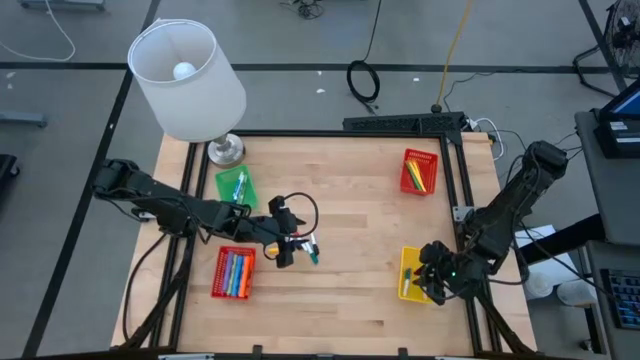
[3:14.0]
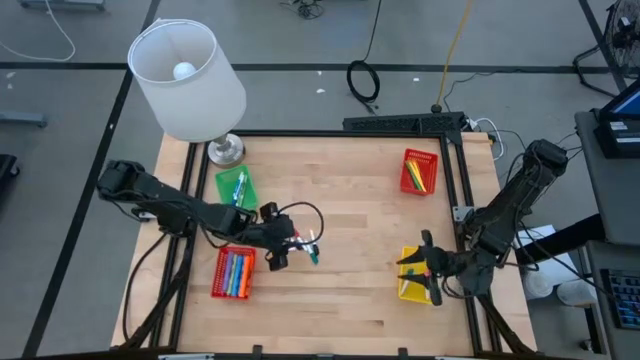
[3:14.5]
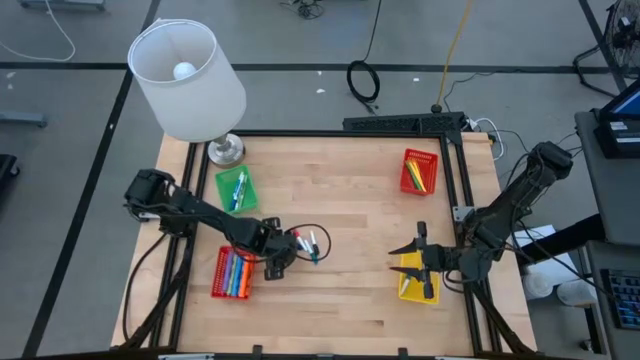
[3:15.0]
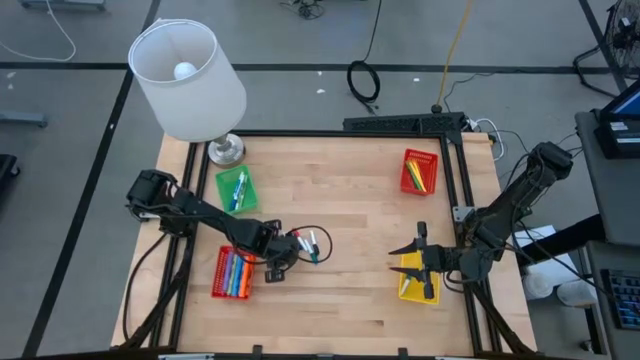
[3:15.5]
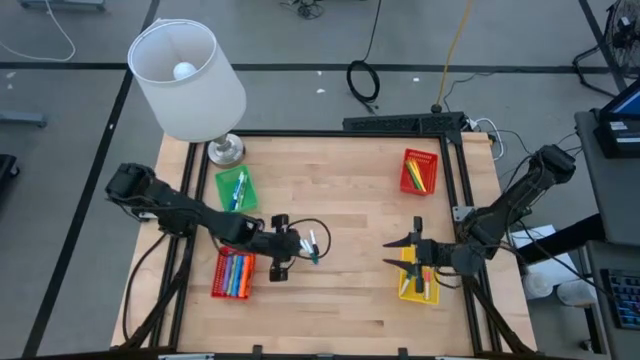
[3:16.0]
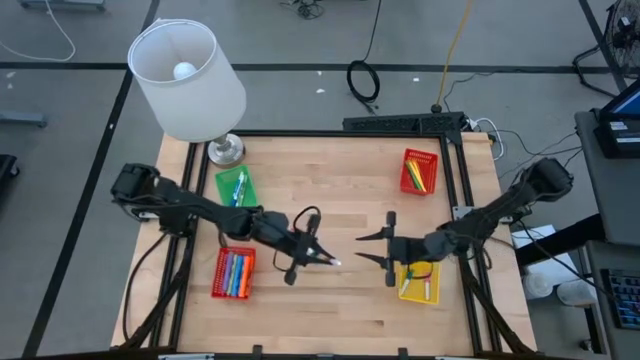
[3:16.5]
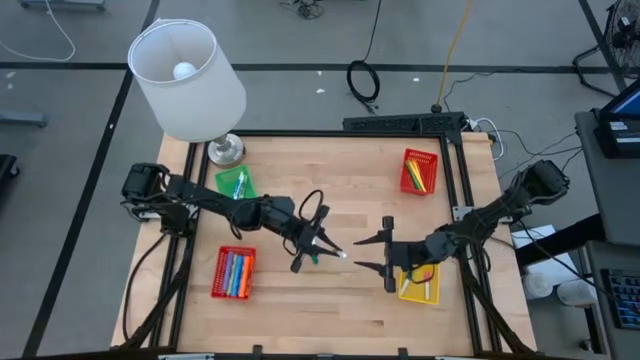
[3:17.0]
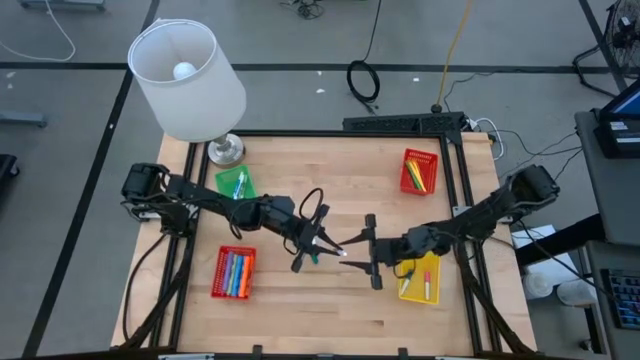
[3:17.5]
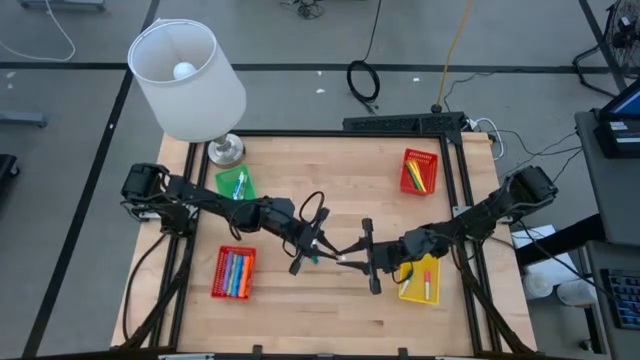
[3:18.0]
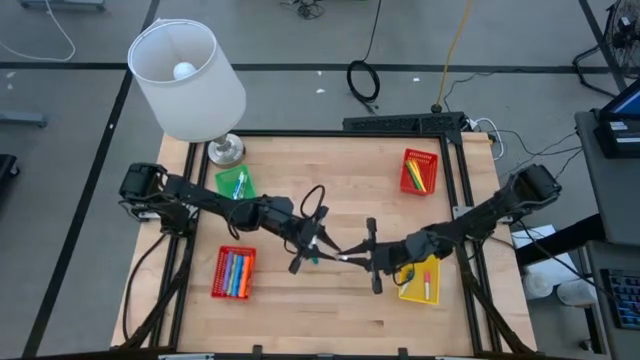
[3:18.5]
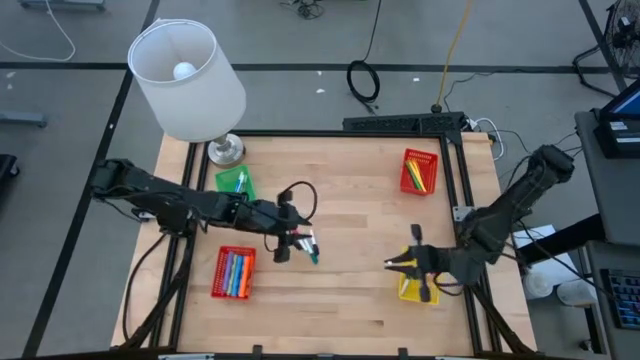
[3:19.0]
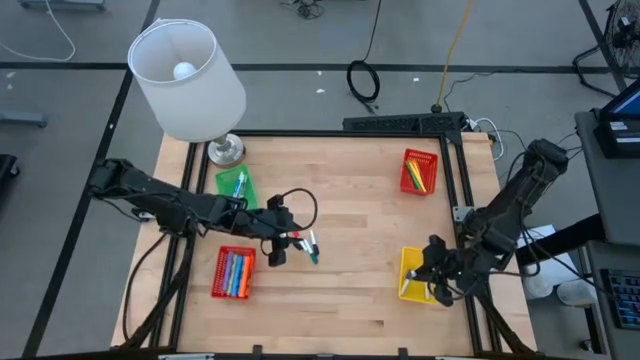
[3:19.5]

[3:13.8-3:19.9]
Task: Pick & Place Markers
Put the yellow highlighter pen into the yellow basket

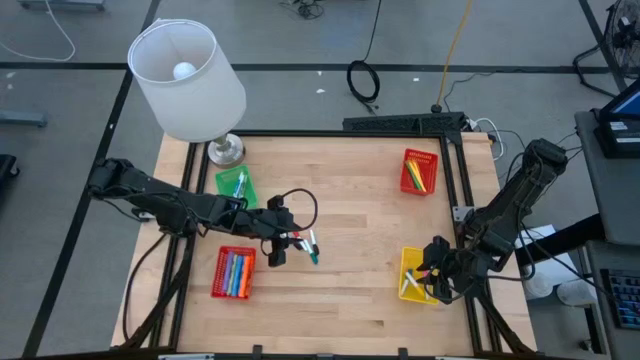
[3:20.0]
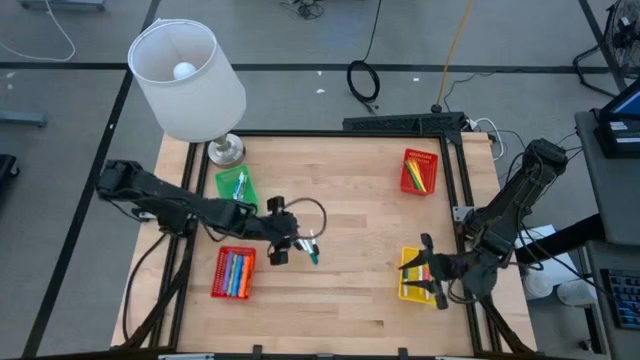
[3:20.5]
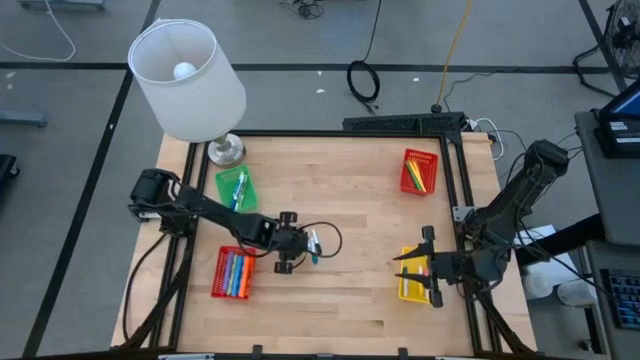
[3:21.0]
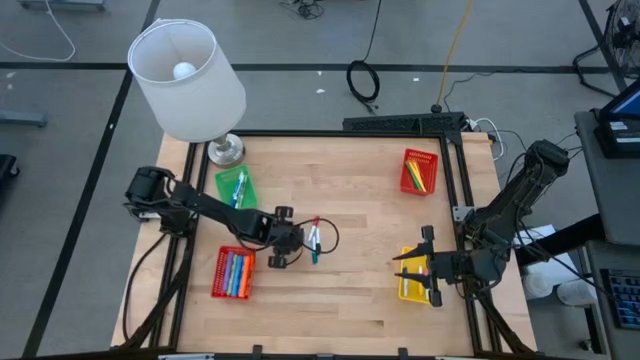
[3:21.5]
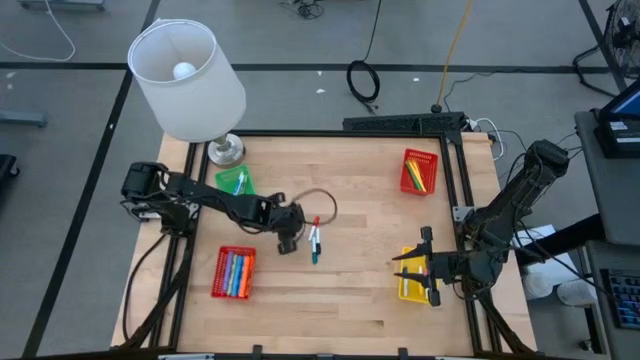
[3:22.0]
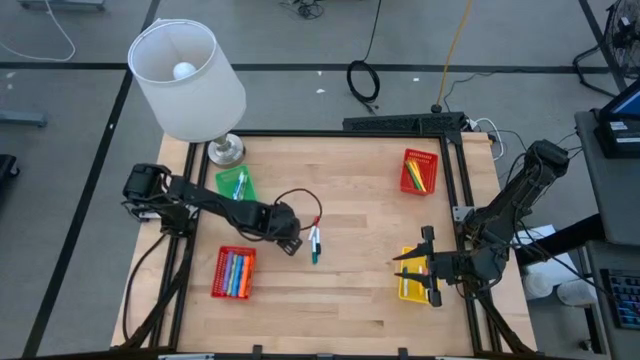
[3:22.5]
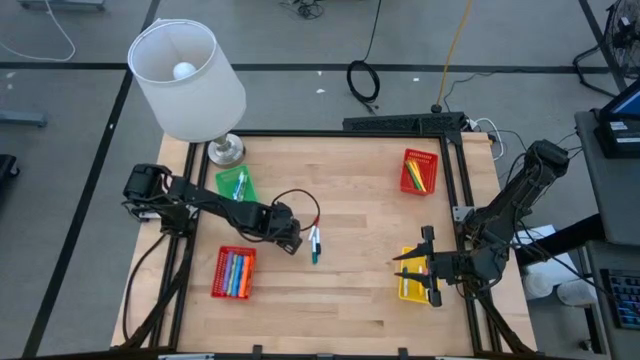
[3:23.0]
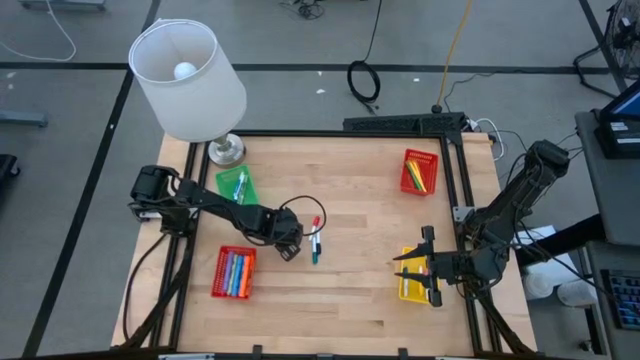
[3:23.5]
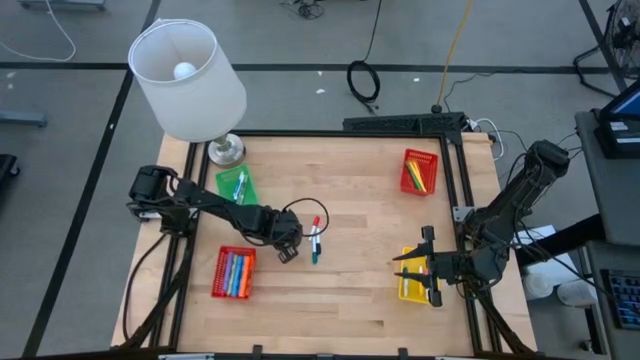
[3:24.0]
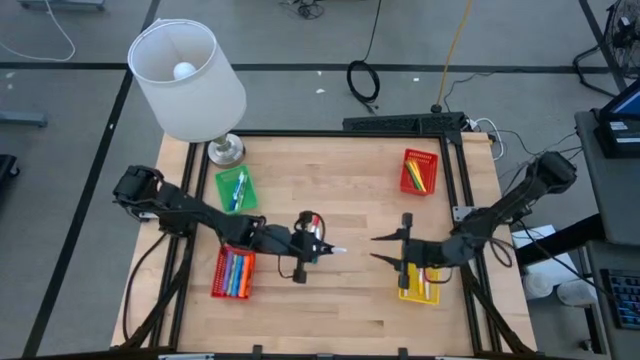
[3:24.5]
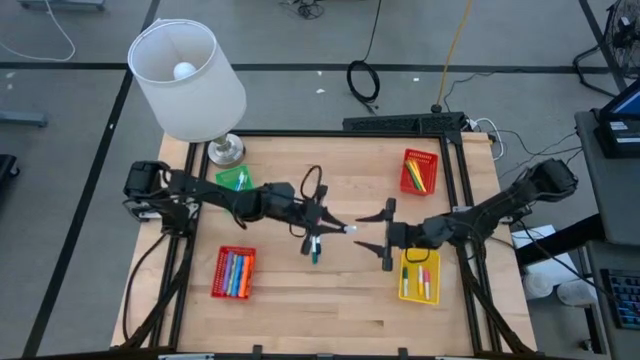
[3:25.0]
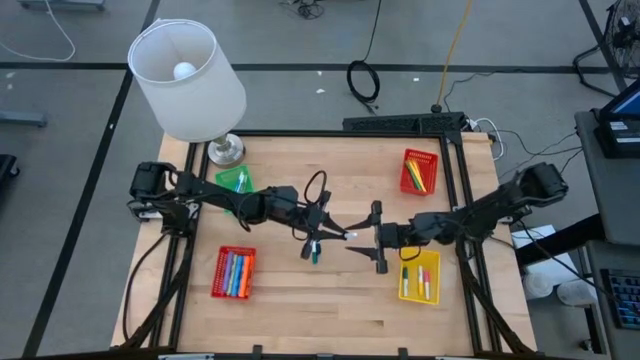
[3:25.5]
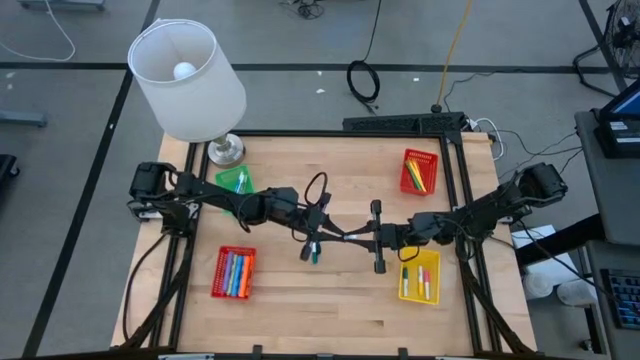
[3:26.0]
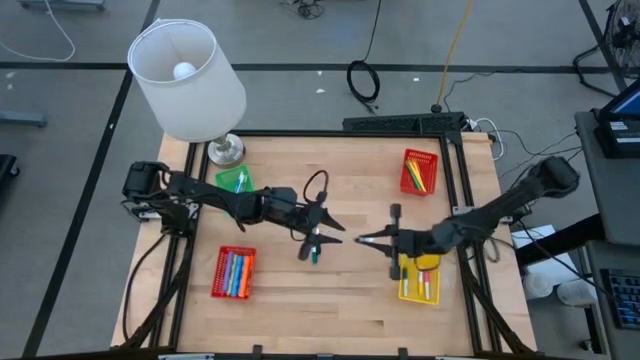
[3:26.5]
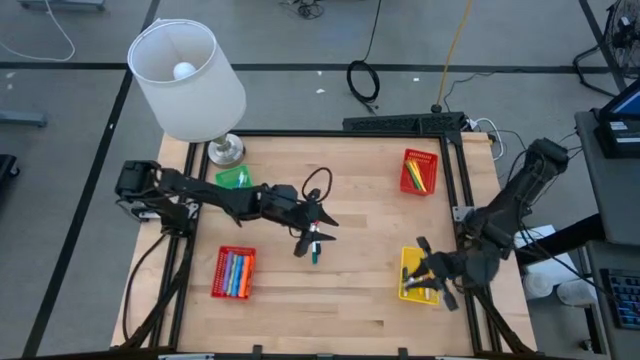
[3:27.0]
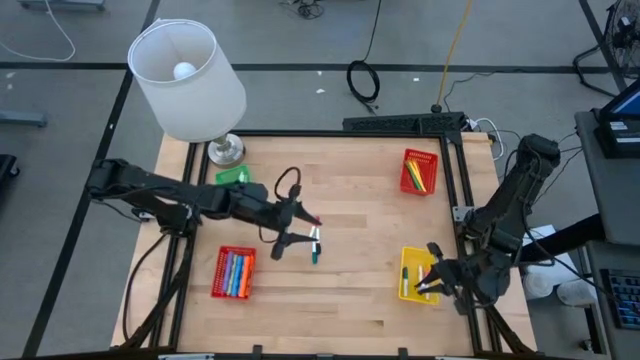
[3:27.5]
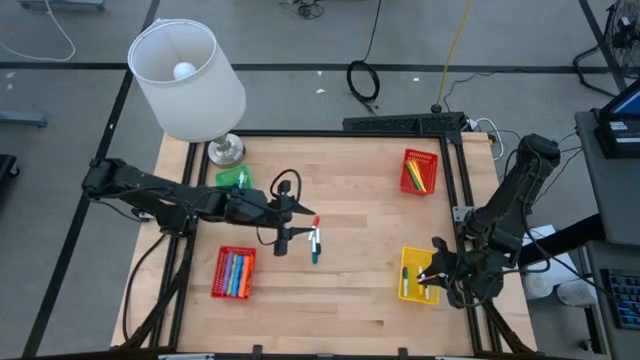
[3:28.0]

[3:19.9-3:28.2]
Put the black highlighter pen into the yellow basket

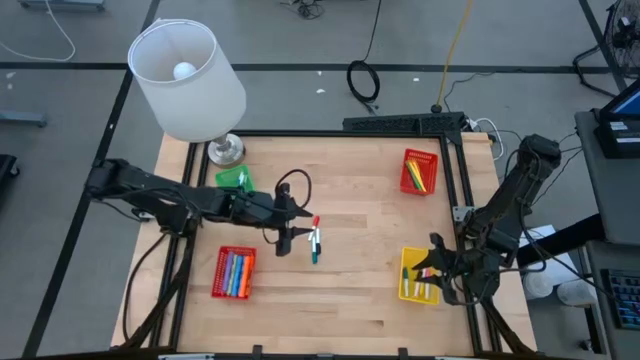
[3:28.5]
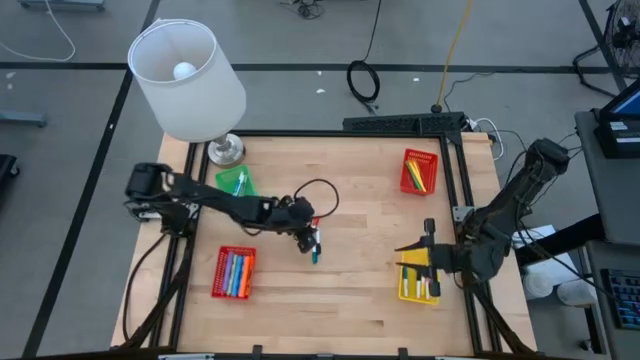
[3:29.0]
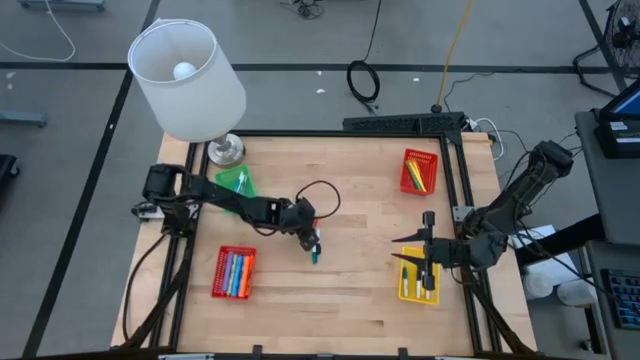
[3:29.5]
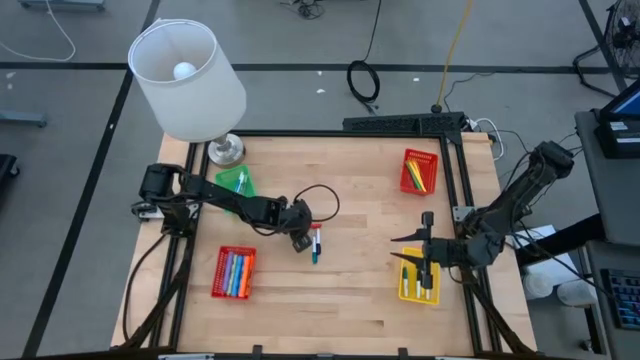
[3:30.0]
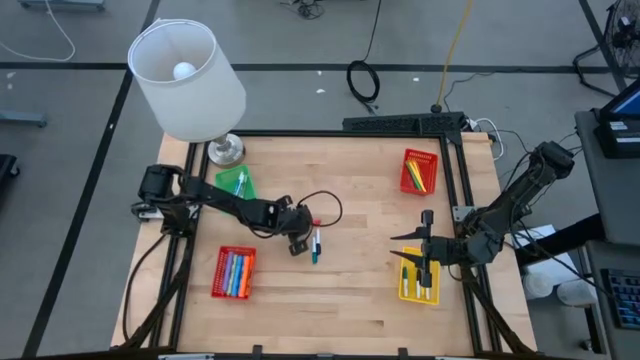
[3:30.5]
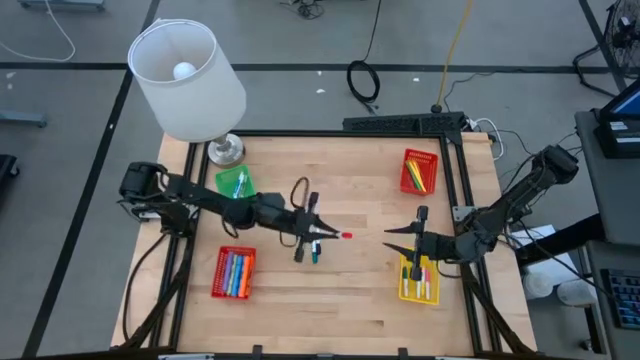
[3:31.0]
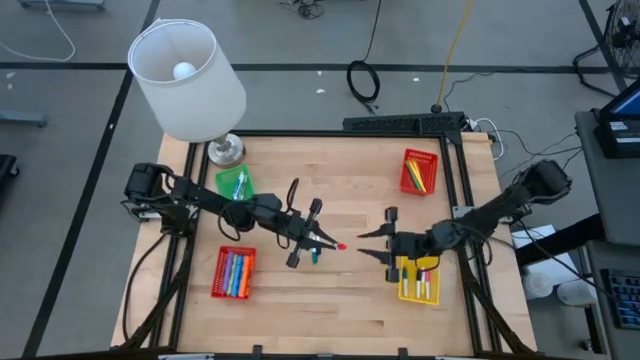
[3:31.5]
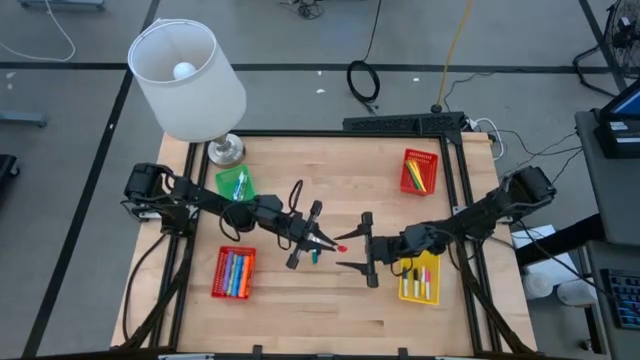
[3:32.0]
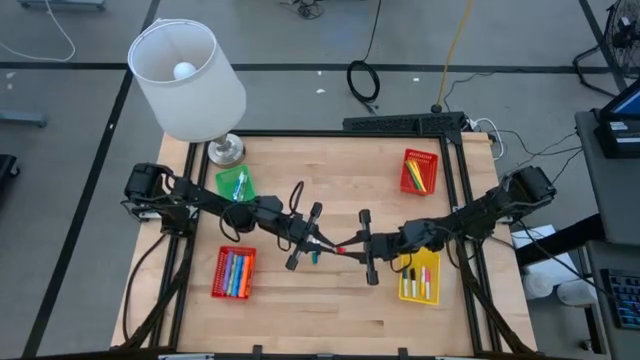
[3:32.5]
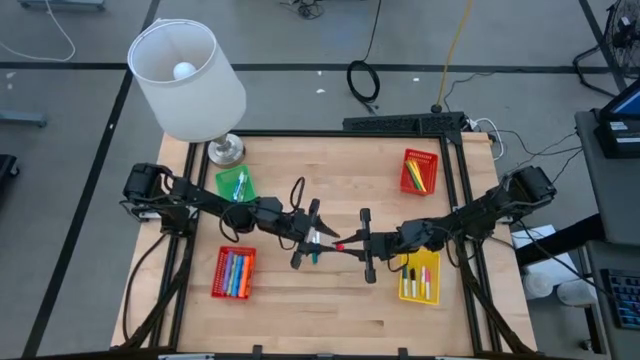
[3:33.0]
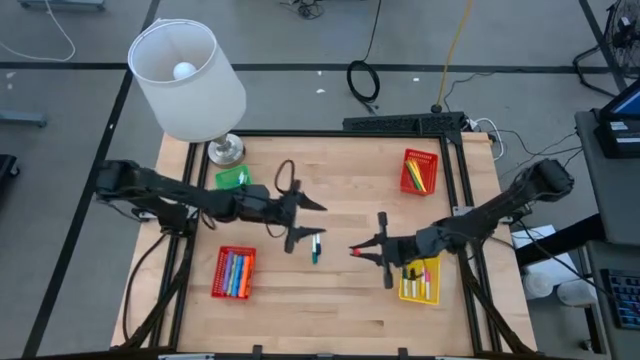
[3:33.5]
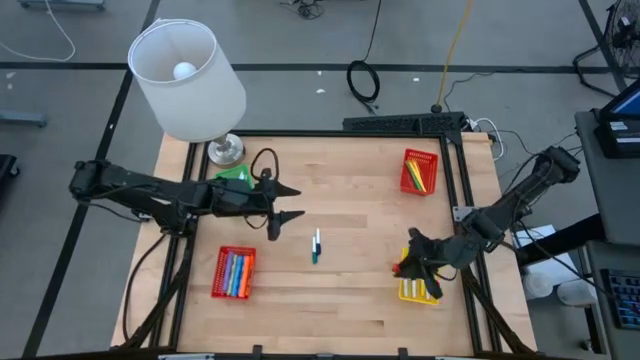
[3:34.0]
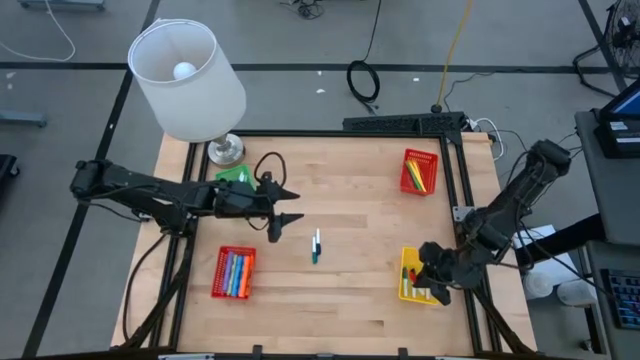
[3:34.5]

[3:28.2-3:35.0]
Put the red highlighter pen into the yellow basket

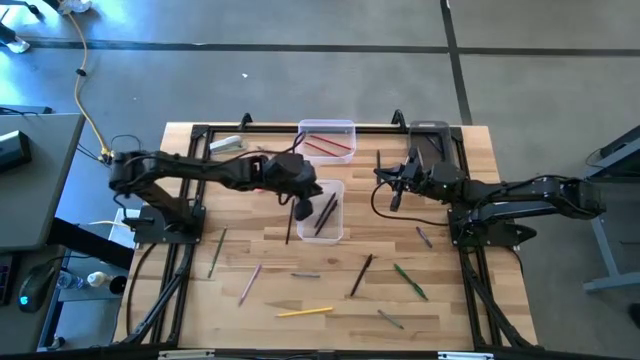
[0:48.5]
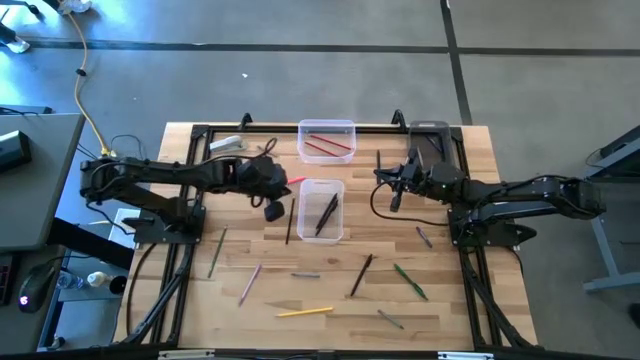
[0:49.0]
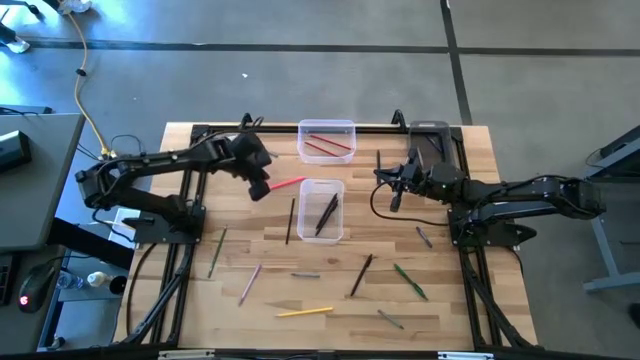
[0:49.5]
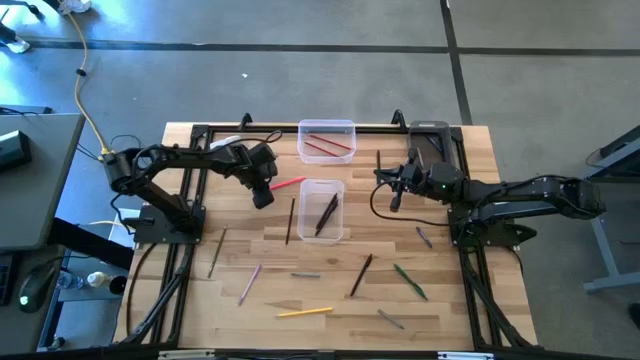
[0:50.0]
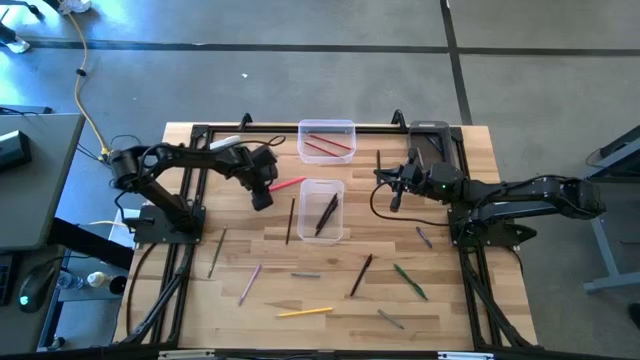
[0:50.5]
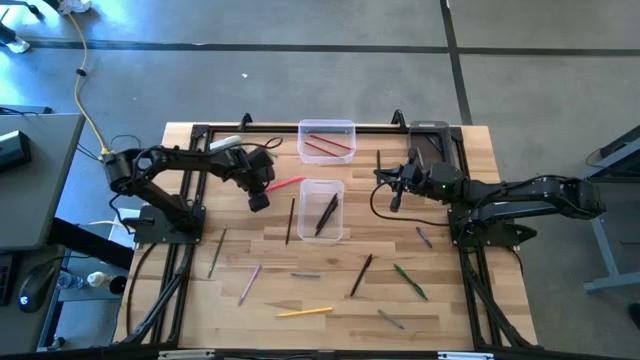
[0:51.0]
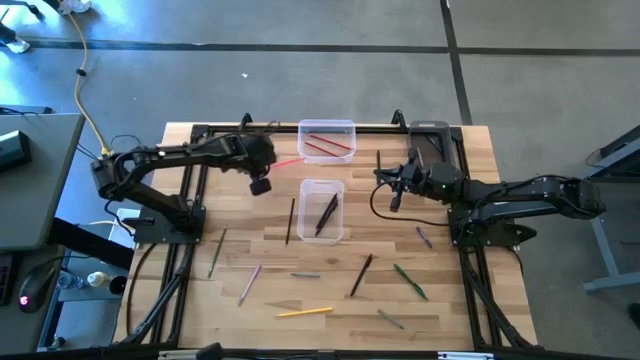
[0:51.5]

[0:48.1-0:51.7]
Task: Sort crayons/erasers/pens/pencils in bins
Put the pink color pencil into the top transparent bin
